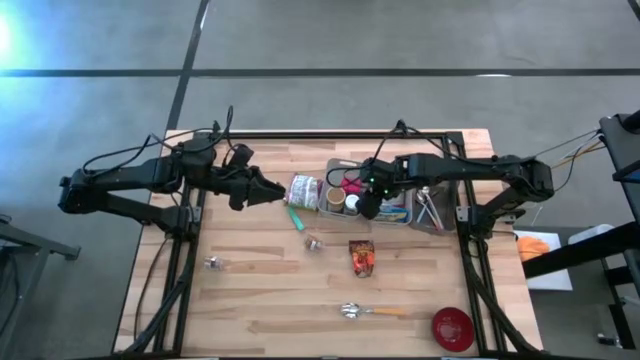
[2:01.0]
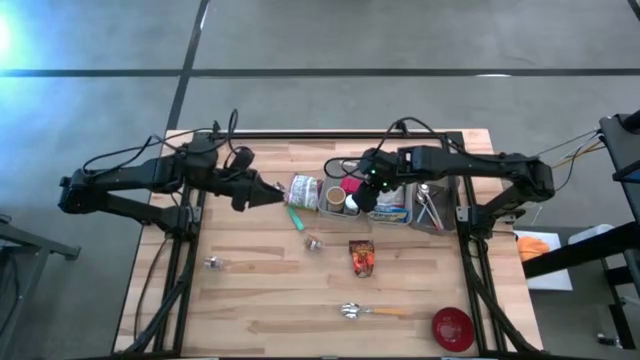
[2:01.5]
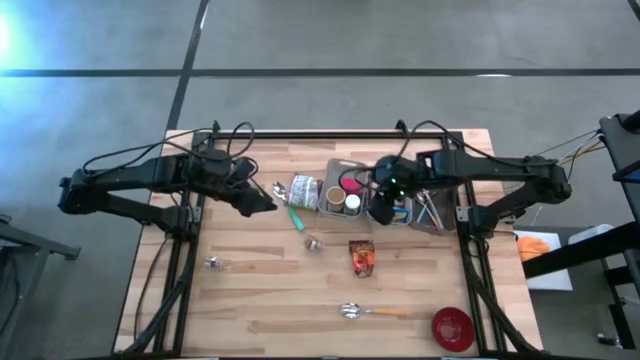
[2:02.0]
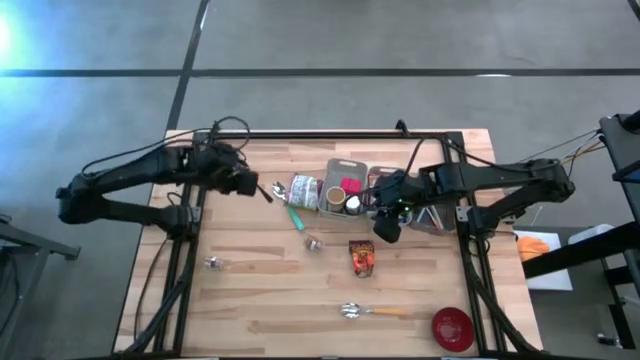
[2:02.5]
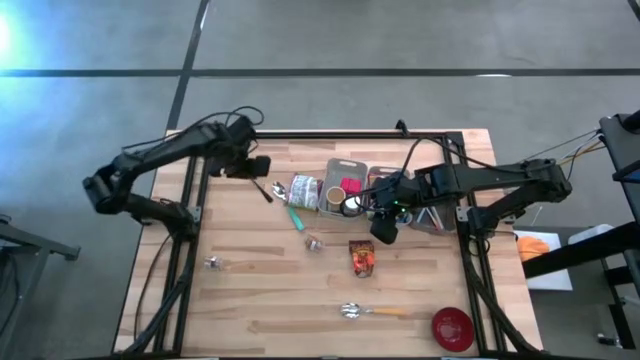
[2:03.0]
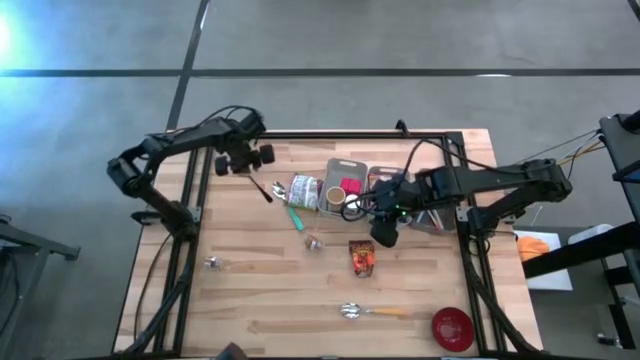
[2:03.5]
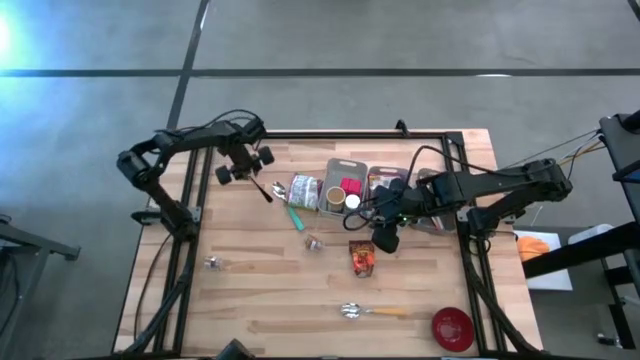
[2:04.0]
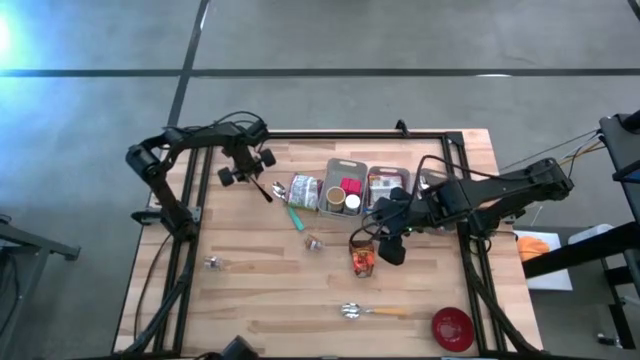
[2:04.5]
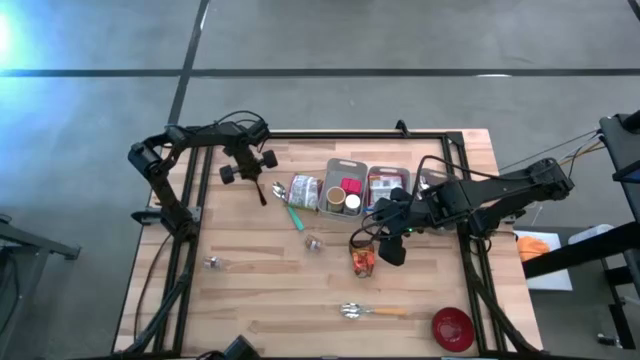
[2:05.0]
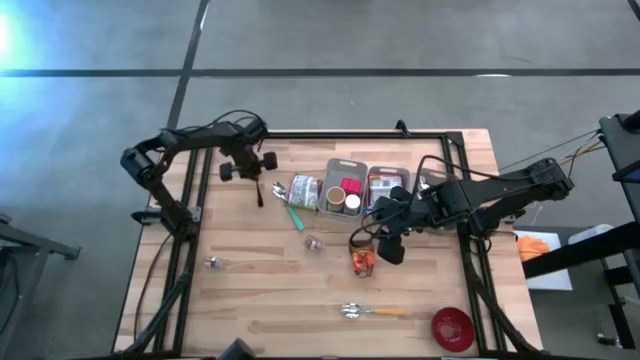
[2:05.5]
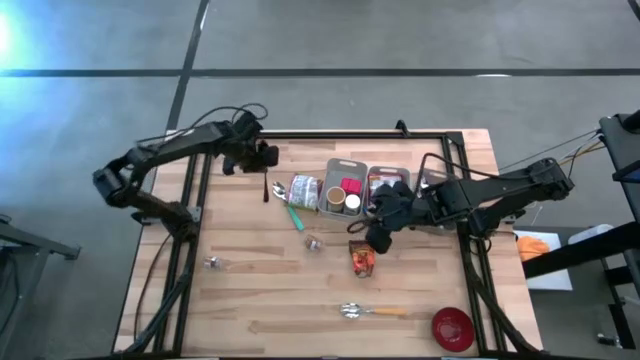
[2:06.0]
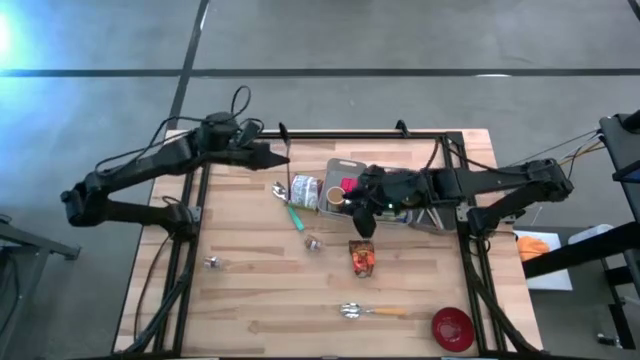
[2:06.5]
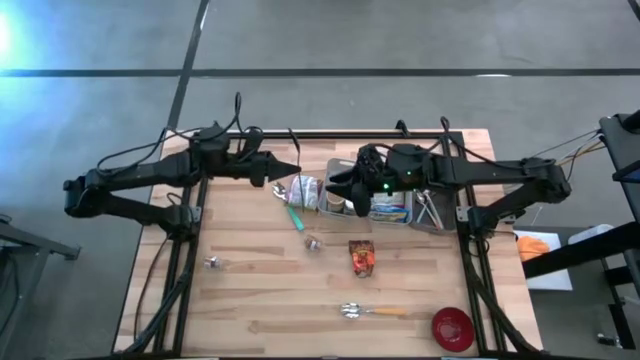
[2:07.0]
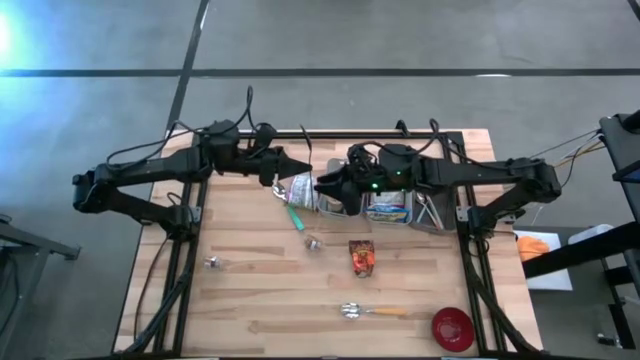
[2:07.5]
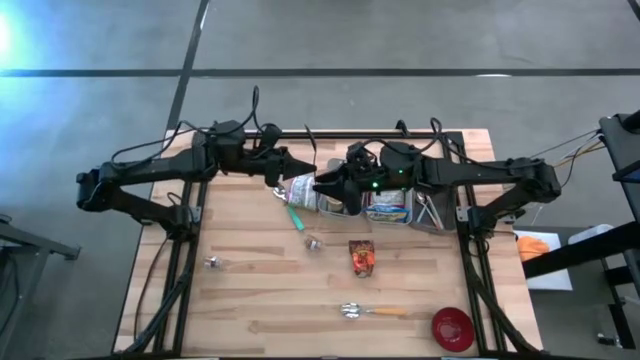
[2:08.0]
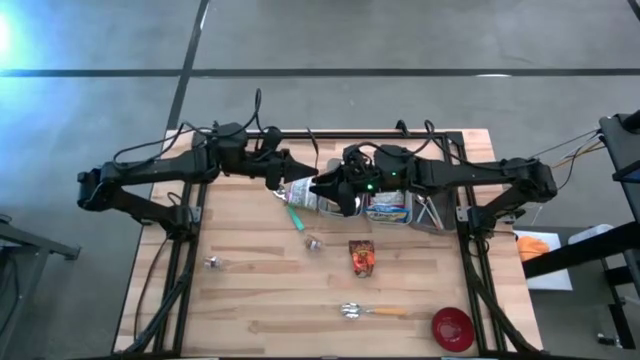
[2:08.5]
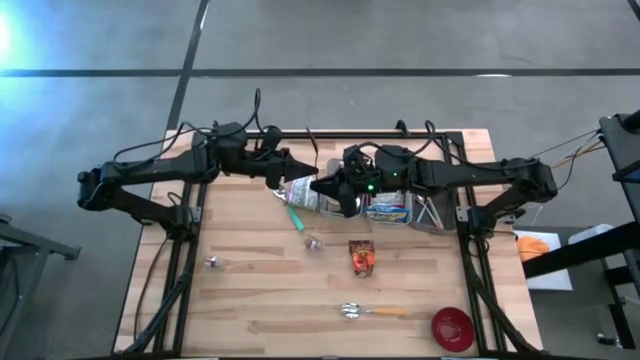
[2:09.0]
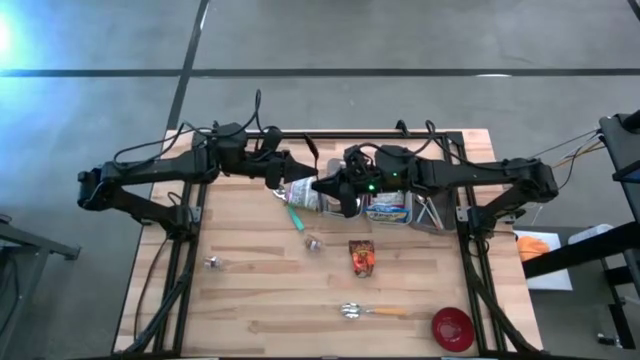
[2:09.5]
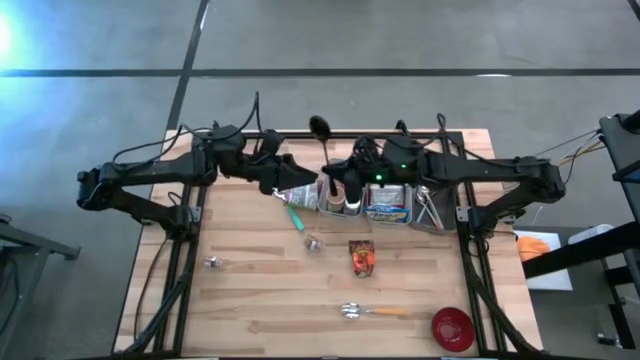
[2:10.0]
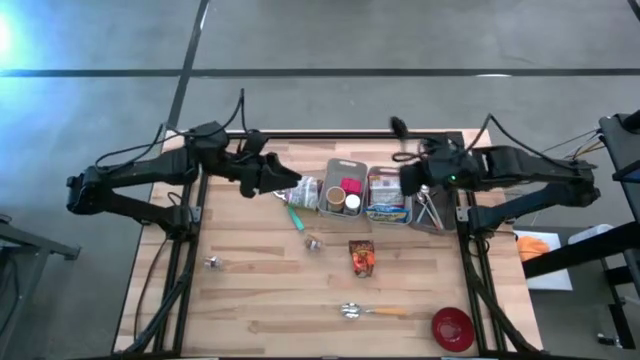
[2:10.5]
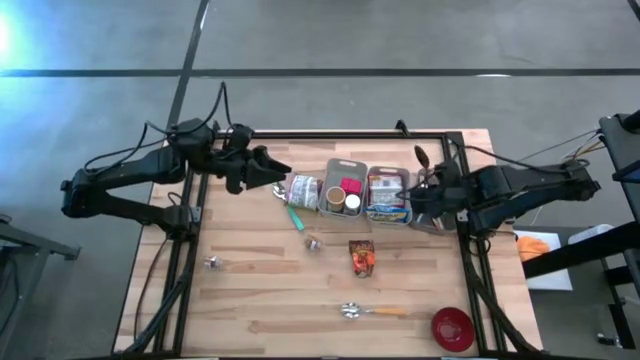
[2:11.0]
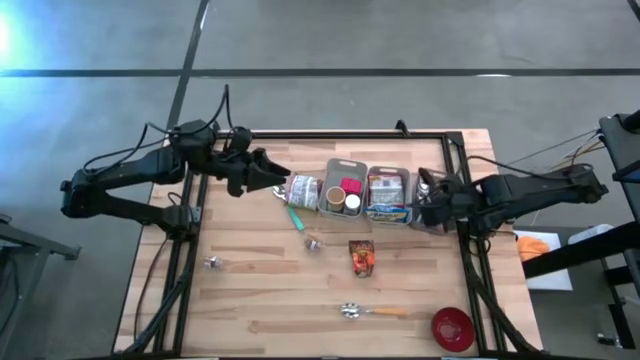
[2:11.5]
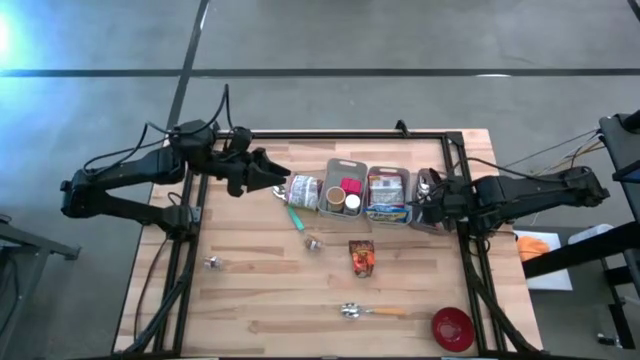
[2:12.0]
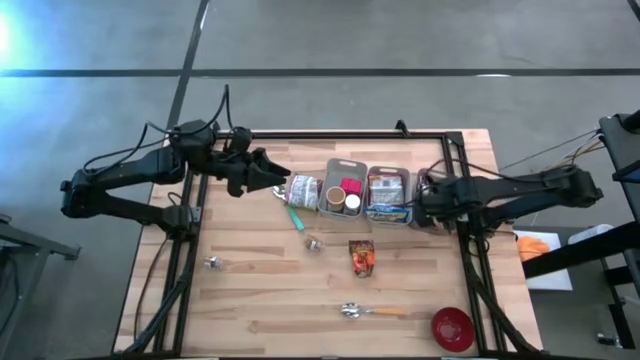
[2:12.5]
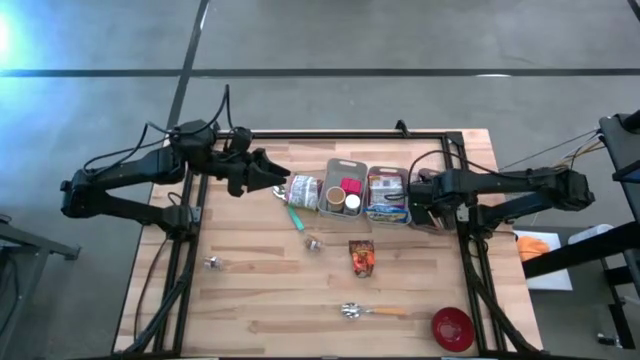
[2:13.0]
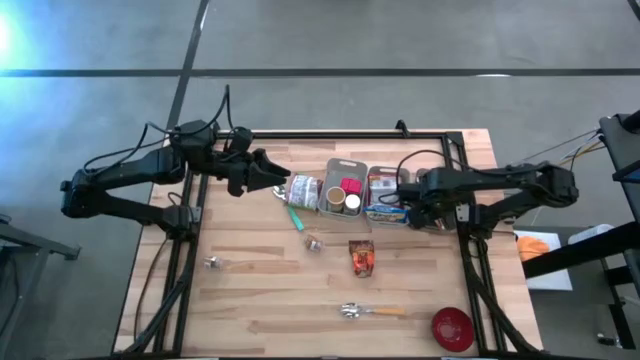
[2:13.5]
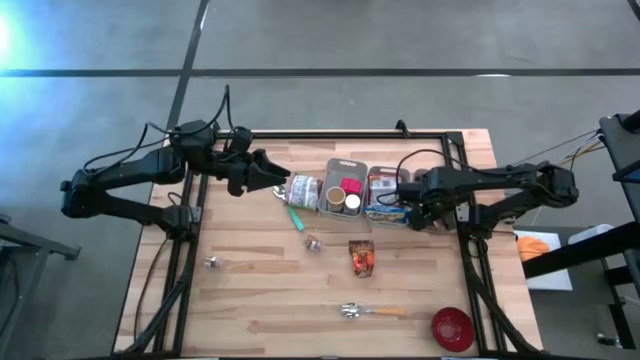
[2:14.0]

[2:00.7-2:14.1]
Put the black spoon into the black bin

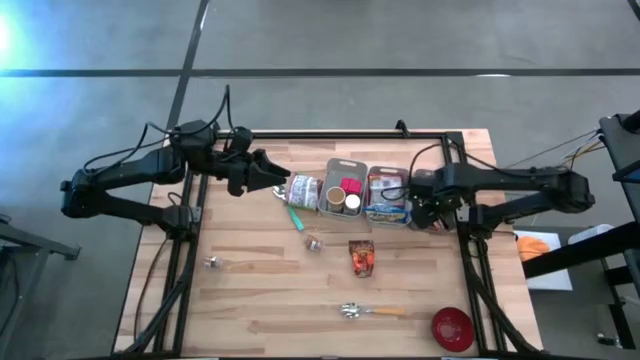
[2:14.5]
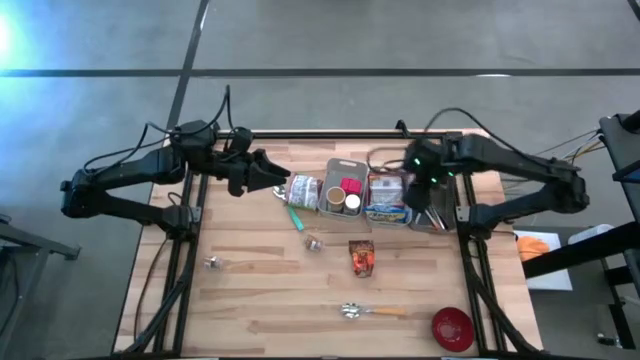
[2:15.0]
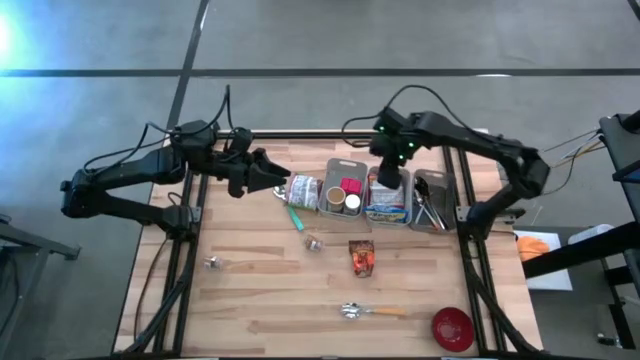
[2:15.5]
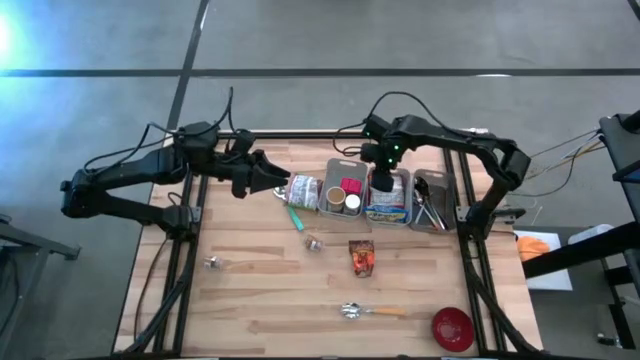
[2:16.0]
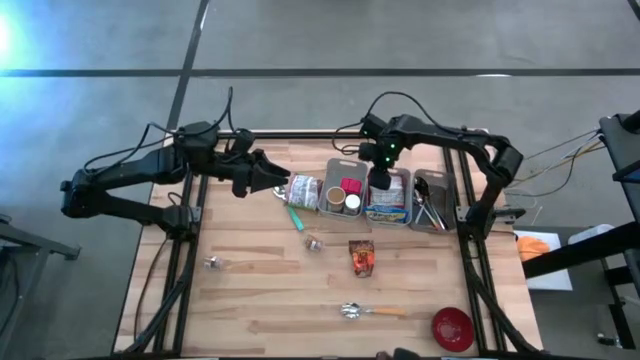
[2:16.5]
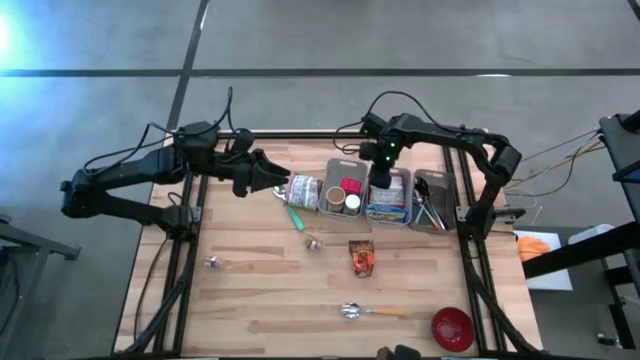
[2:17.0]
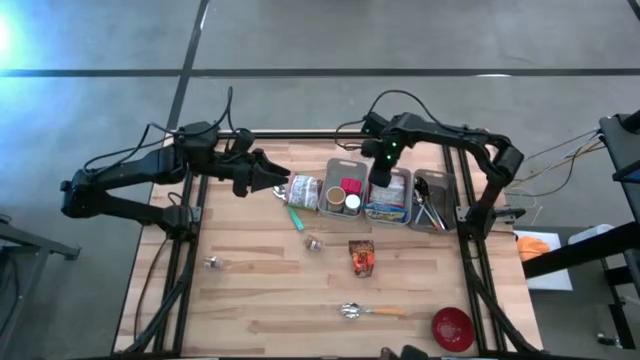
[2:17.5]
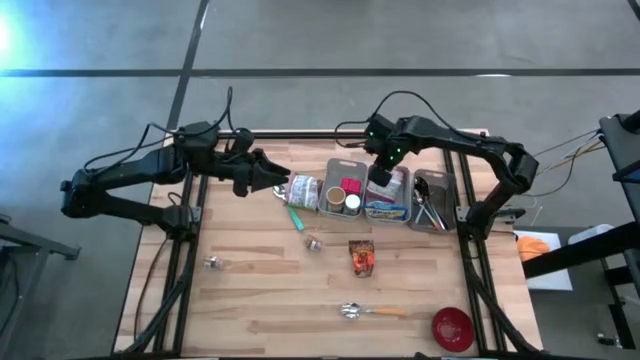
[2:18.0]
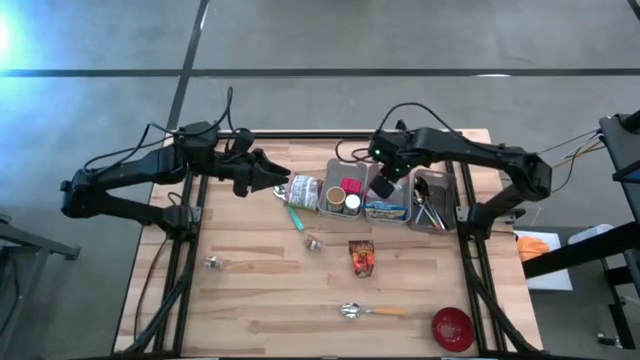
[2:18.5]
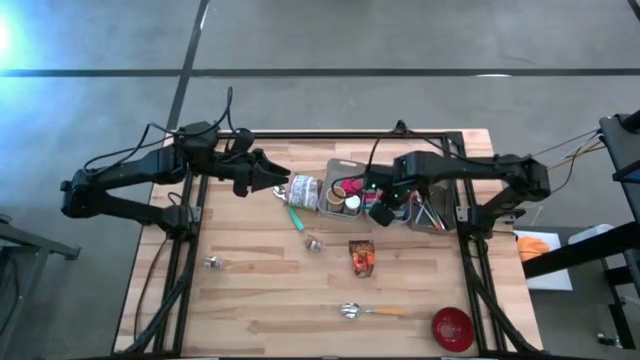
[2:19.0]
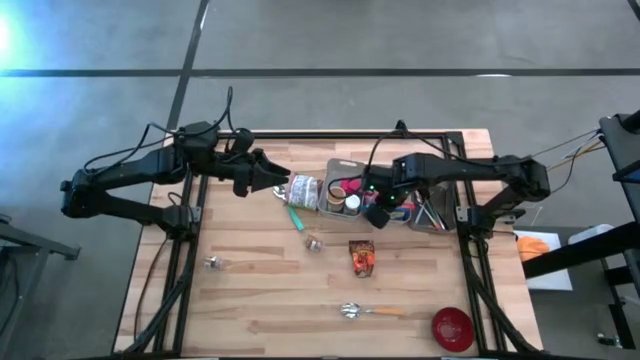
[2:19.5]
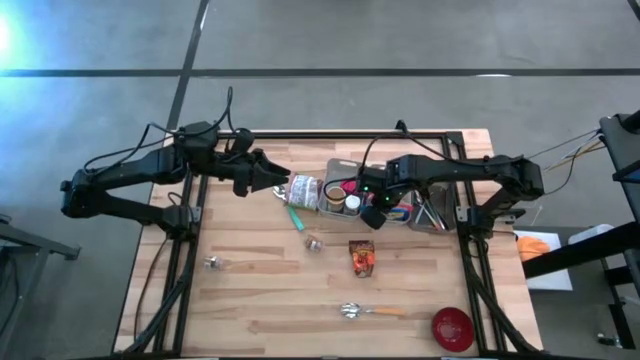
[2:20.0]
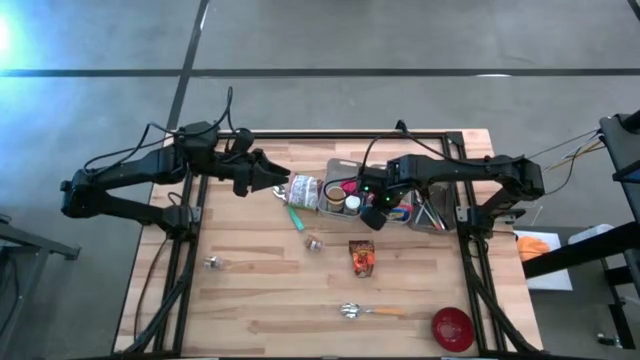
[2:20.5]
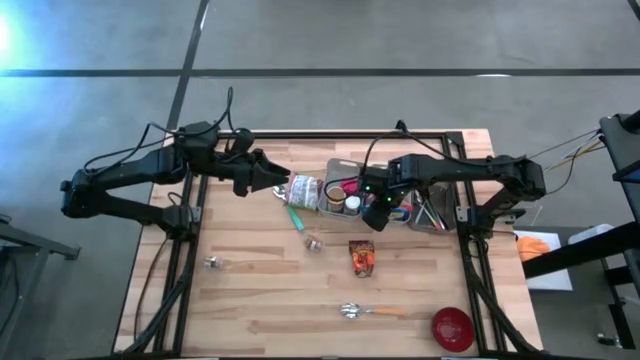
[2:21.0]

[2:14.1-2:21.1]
Adjust the red noodle pack in the gray bin
